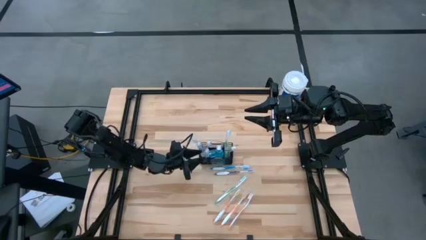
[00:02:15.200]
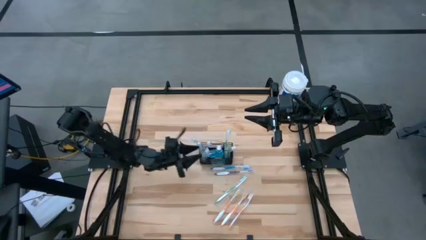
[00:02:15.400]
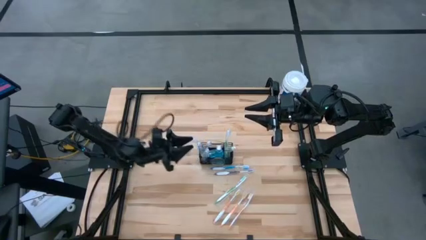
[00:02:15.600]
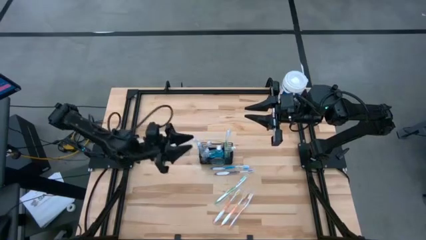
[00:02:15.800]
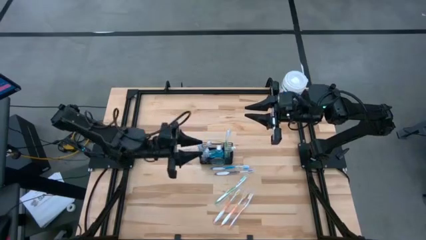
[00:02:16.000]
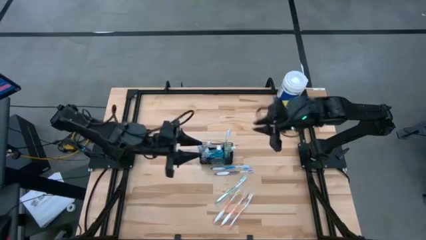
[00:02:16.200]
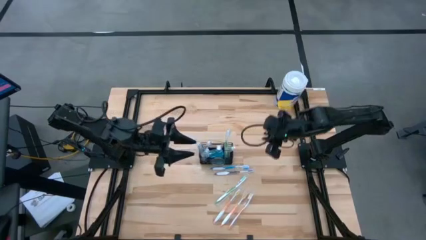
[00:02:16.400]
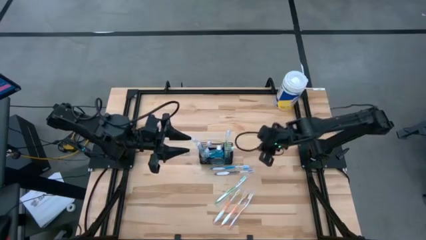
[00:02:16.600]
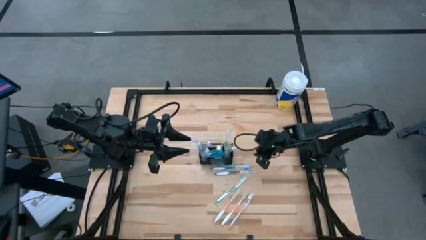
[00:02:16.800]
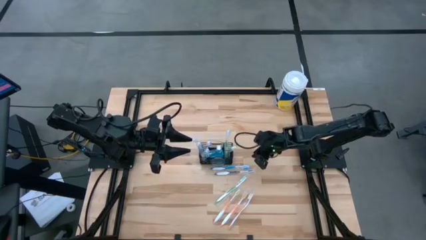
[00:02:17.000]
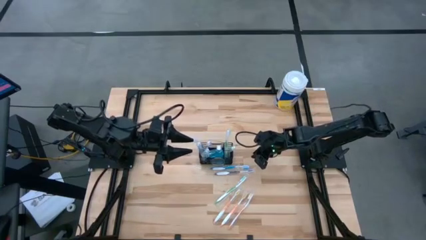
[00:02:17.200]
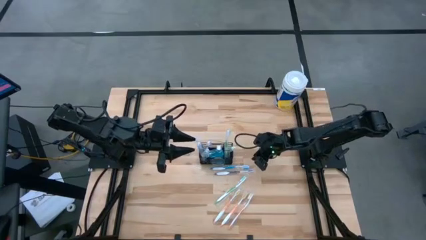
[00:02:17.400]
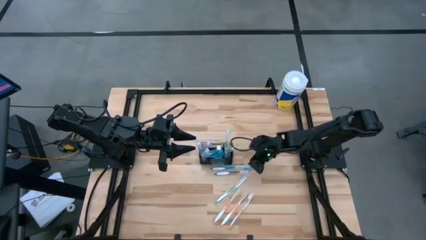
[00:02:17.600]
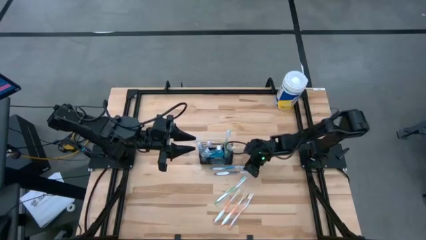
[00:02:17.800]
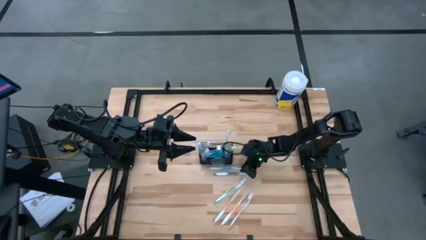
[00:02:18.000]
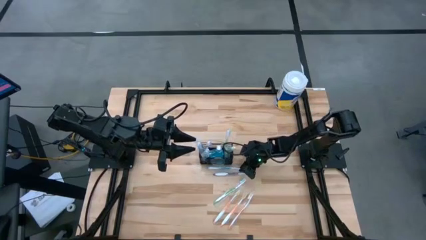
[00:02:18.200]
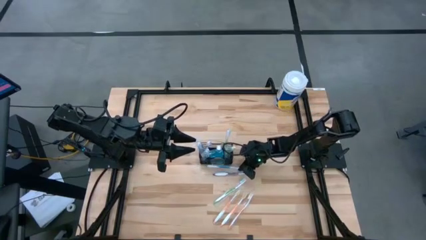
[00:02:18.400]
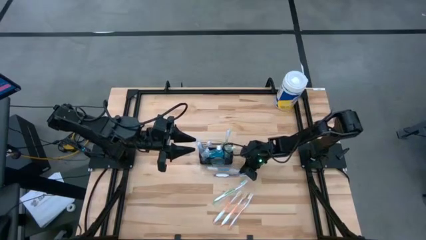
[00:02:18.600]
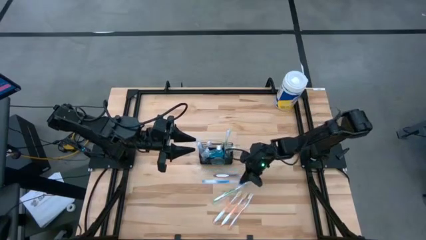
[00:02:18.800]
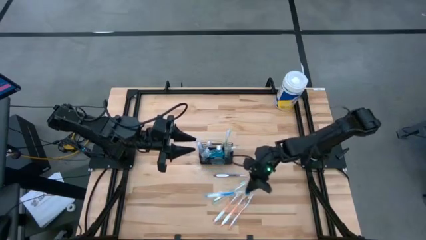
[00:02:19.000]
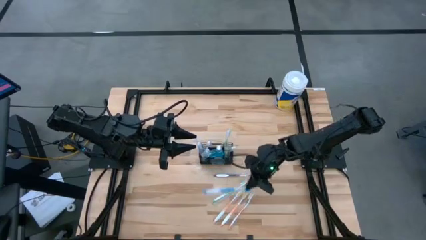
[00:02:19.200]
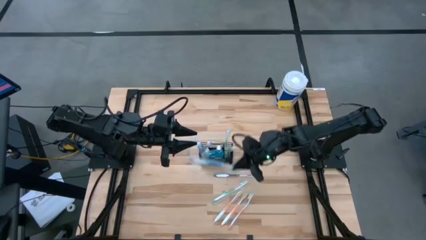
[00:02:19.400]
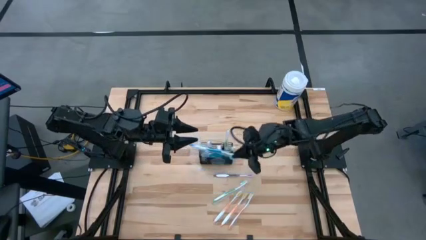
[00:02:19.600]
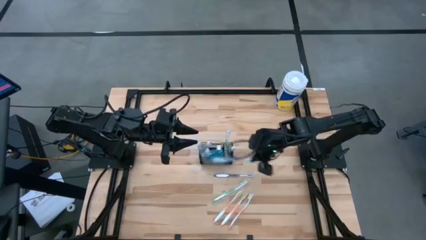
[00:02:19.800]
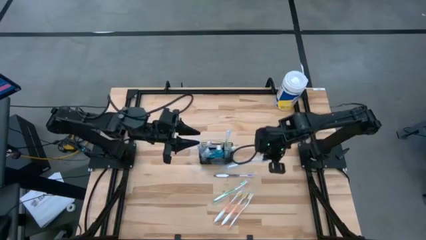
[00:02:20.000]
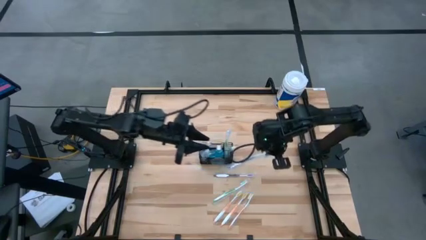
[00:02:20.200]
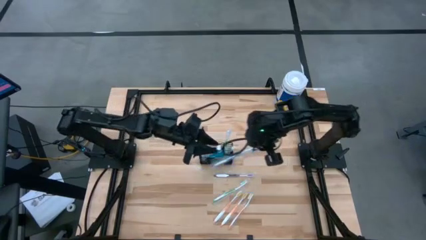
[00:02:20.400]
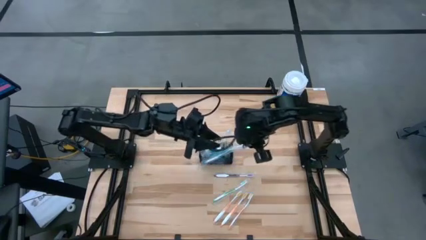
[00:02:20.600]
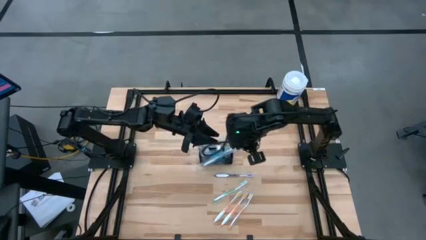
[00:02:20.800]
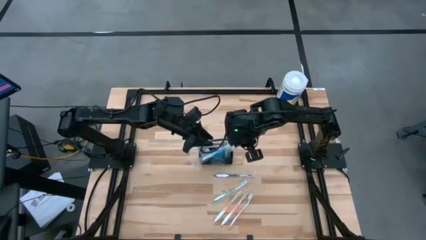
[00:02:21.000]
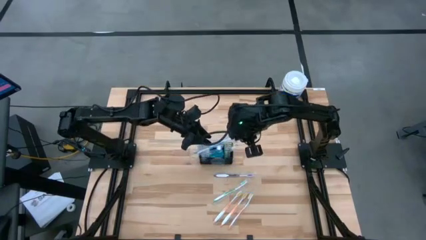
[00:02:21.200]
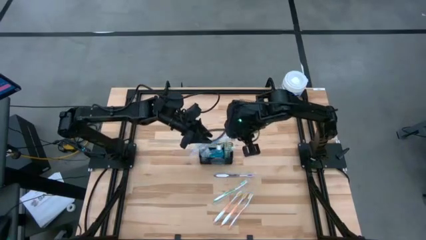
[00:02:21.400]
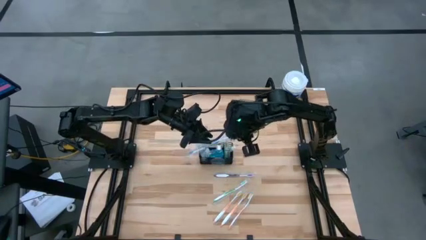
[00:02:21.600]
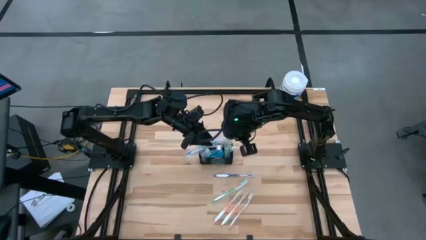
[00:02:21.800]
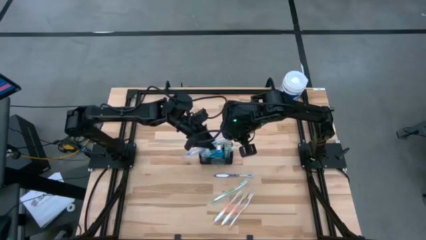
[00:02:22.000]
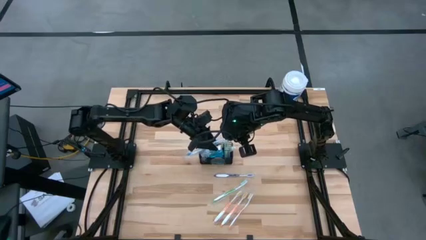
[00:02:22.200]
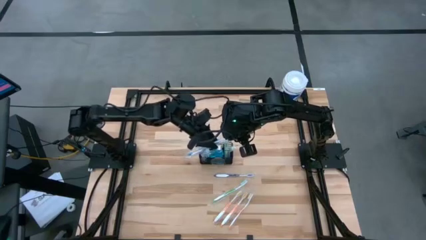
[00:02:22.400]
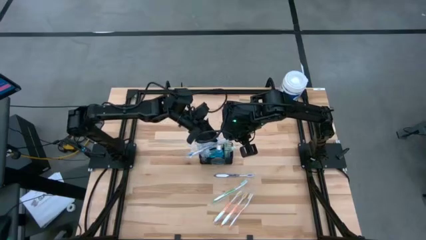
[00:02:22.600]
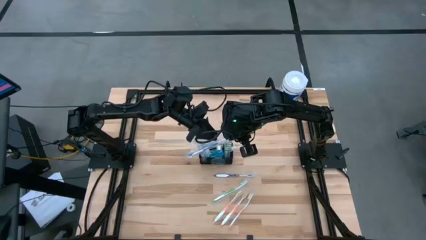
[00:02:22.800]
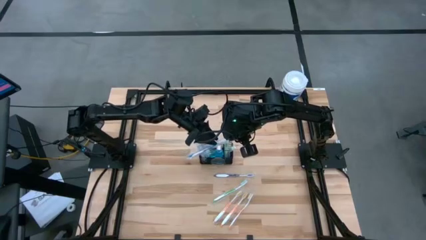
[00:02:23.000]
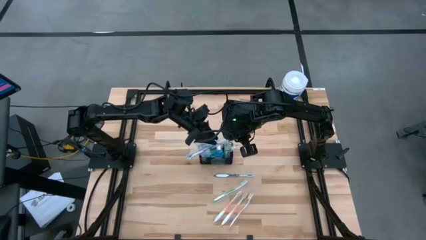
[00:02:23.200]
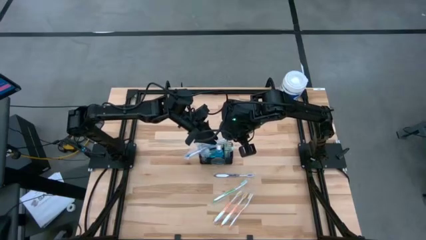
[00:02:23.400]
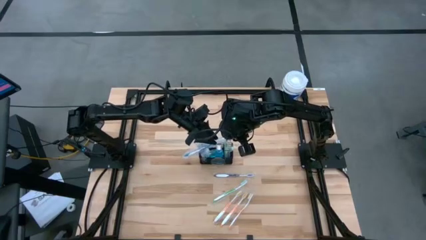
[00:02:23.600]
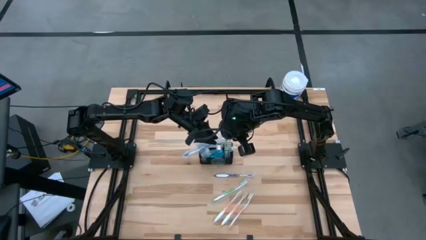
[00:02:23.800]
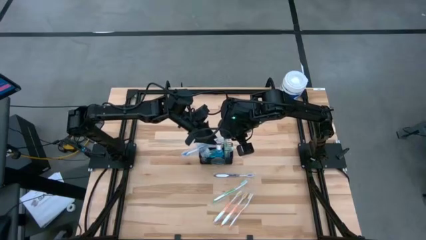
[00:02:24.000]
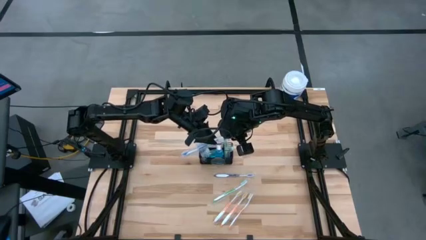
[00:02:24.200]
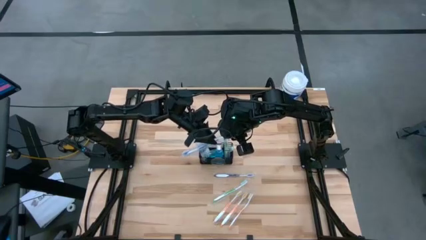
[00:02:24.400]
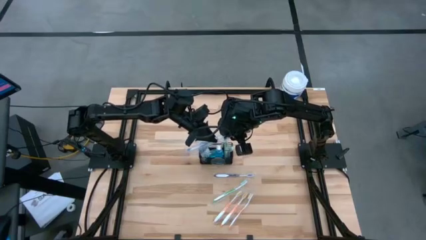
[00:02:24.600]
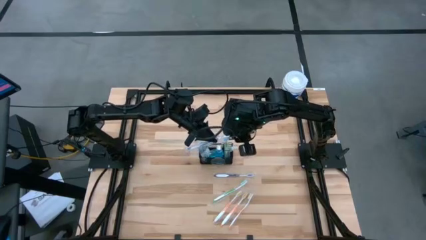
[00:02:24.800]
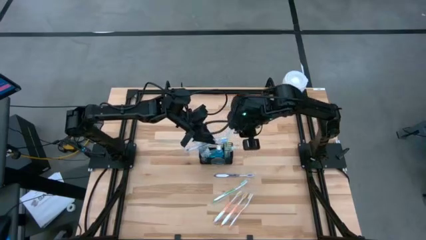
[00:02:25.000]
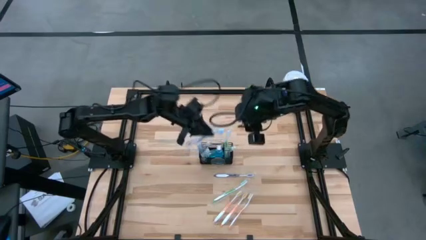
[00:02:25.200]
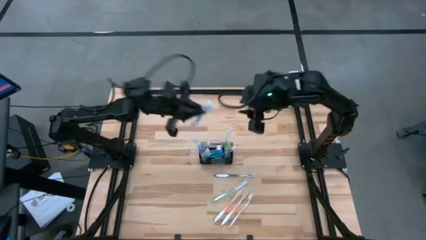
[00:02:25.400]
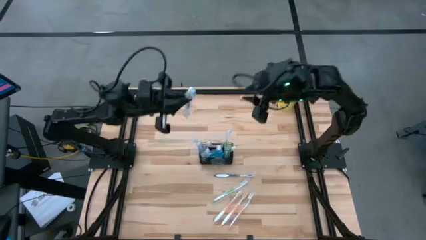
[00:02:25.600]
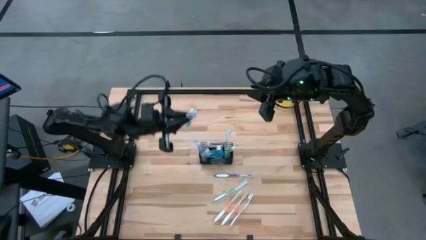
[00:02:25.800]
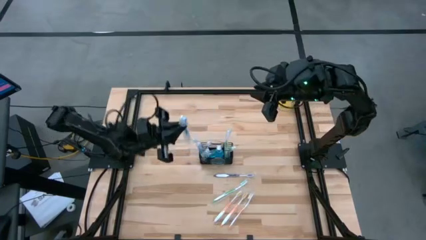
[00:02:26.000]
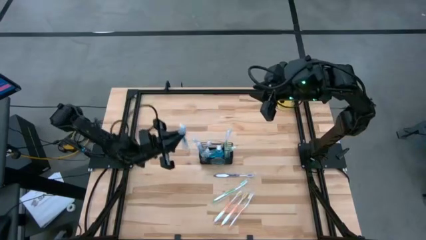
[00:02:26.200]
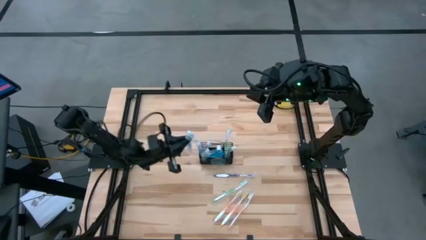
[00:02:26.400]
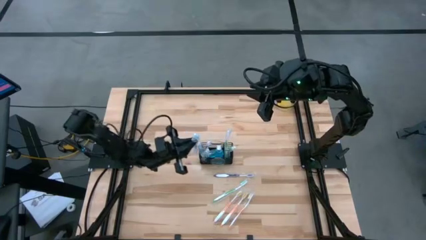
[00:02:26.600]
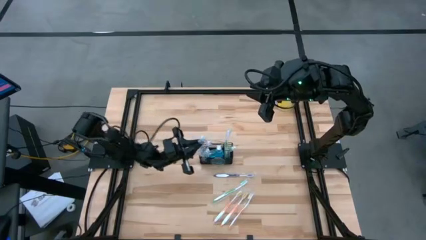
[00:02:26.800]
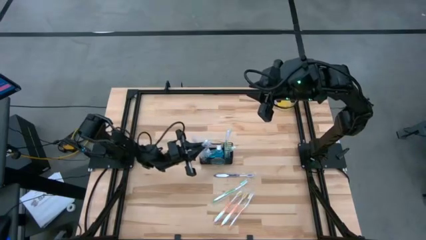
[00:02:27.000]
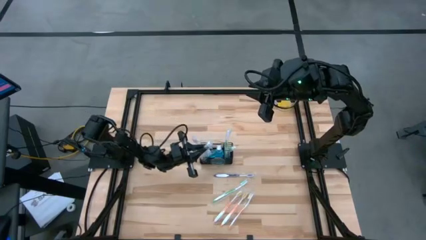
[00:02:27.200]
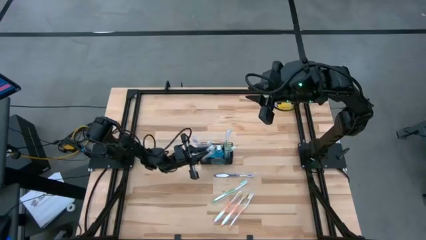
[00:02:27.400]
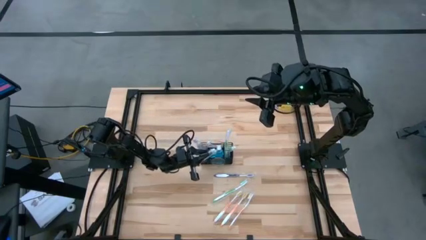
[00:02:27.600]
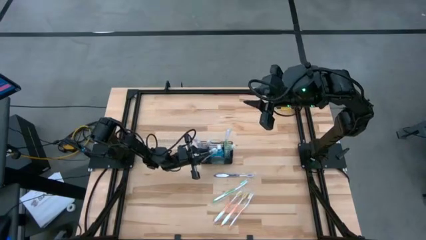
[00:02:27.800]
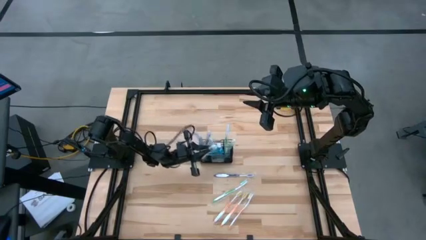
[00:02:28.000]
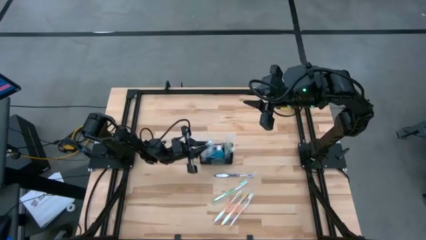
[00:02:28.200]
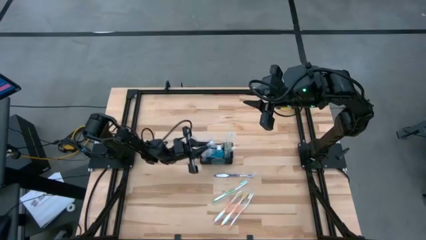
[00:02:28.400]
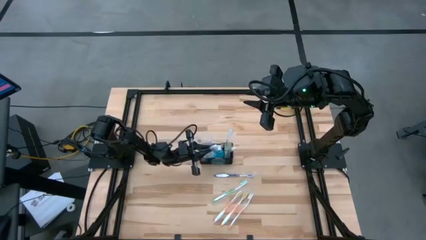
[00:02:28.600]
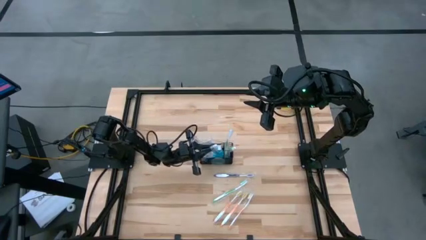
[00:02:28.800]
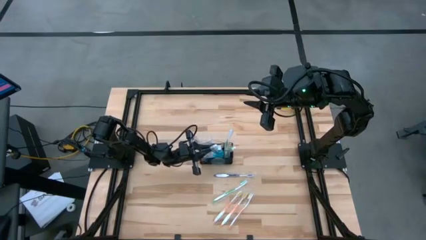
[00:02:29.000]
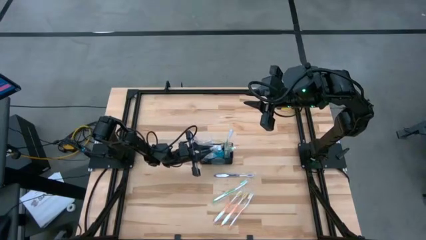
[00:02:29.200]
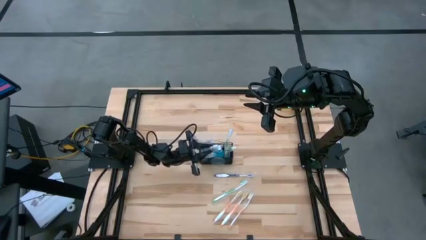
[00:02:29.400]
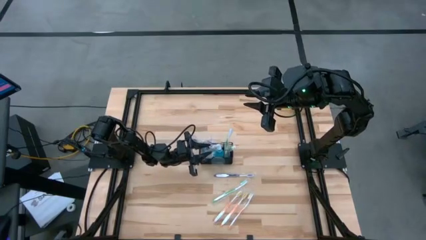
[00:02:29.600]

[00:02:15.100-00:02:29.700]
Task: Pick & Place toothbrushing station
Put the blue toothbrush into the black wire organizer

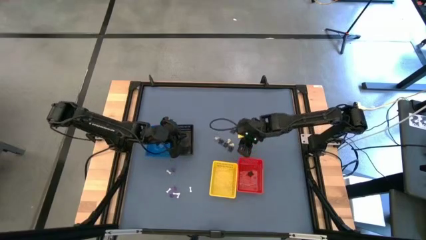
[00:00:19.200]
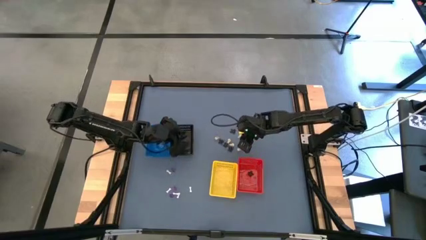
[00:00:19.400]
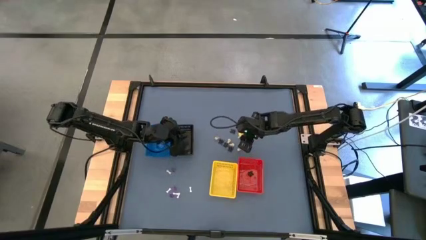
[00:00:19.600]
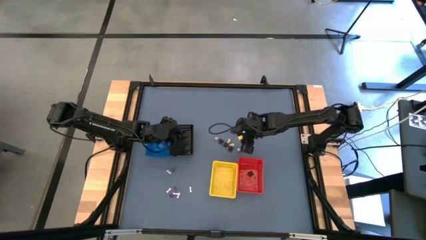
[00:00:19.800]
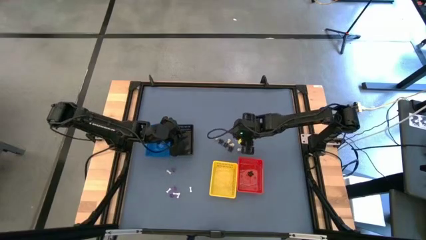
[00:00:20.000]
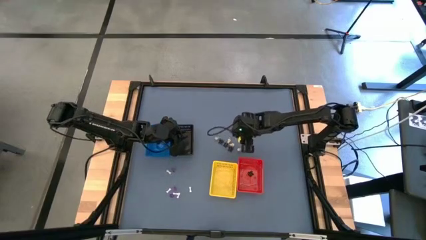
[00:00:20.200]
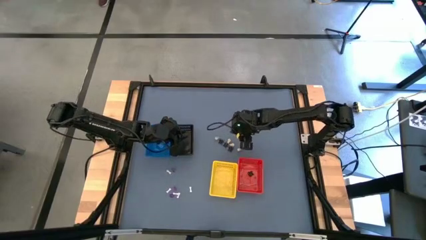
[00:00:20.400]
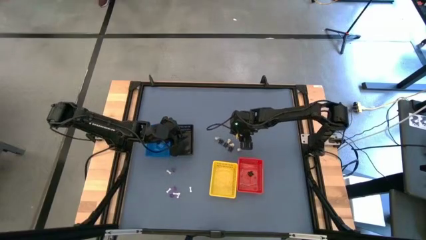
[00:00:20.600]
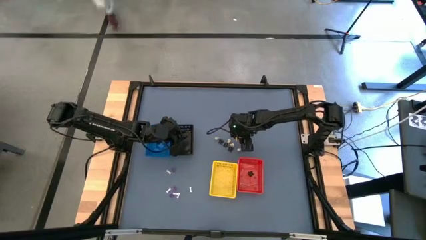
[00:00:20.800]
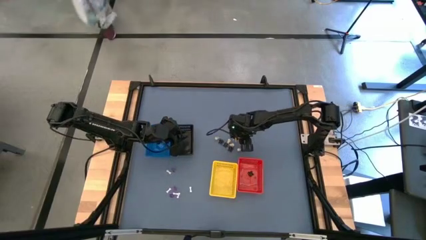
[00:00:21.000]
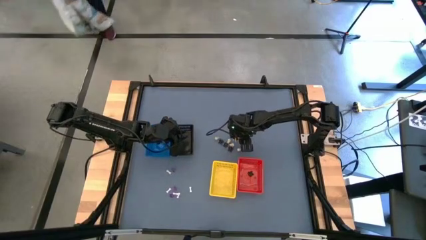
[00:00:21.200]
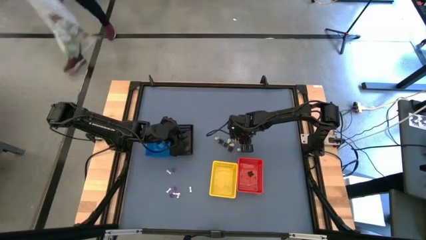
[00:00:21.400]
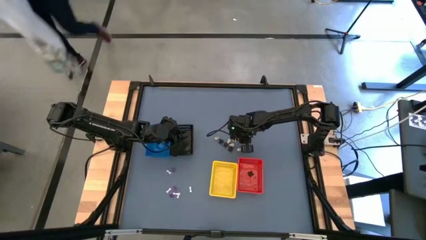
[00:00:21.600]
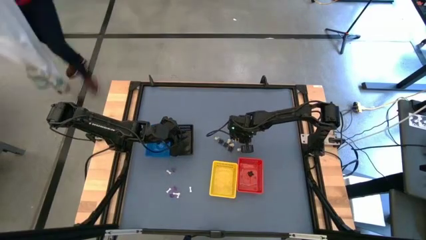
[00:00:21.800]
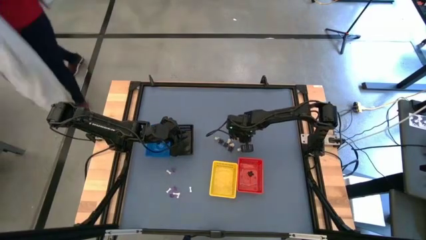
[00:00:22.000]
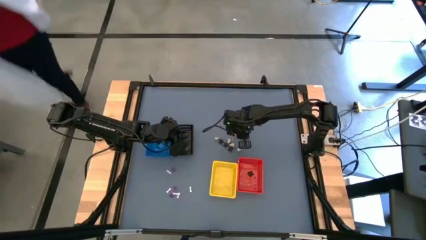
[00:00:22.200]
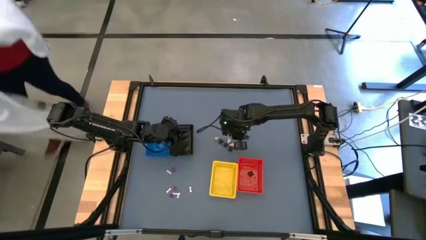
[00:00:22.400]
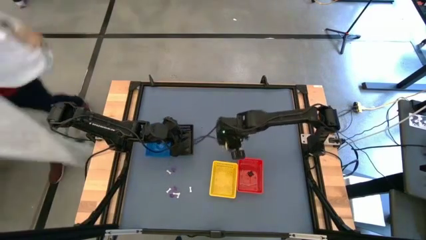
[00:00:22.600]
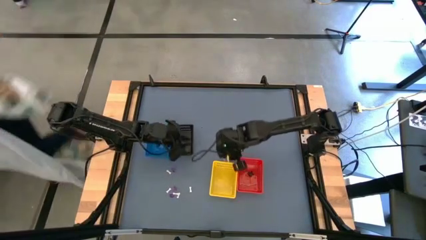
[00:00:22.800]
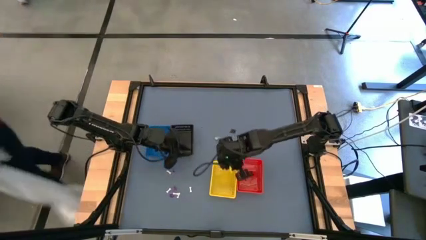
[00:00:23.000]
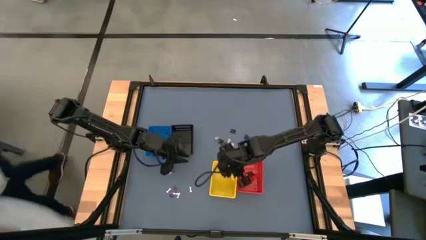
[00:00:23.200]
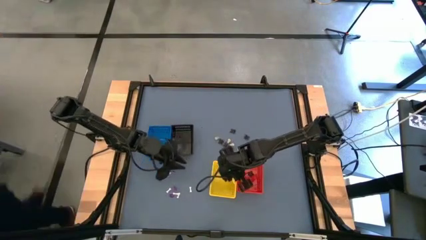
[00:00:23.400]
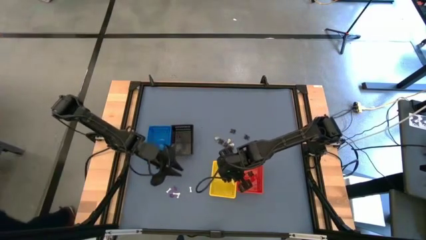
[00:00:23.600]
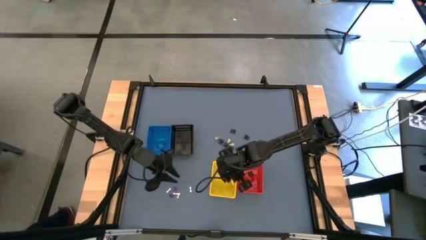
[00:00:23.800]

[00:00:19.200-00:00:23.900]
Task: Sort Halloween decoration
Put the skull toy into the yellow bin
